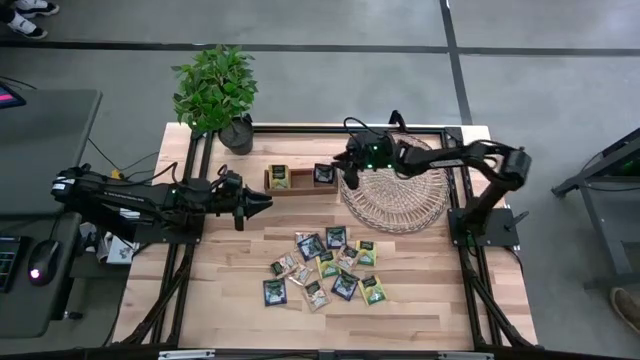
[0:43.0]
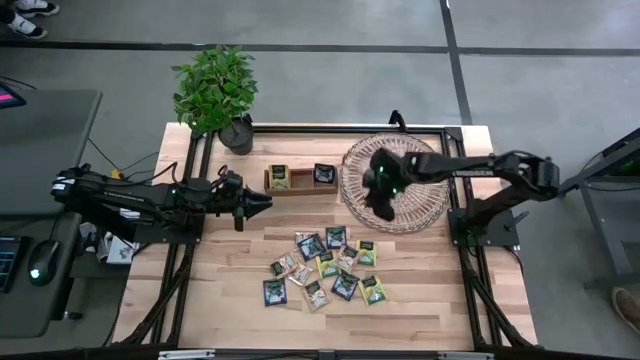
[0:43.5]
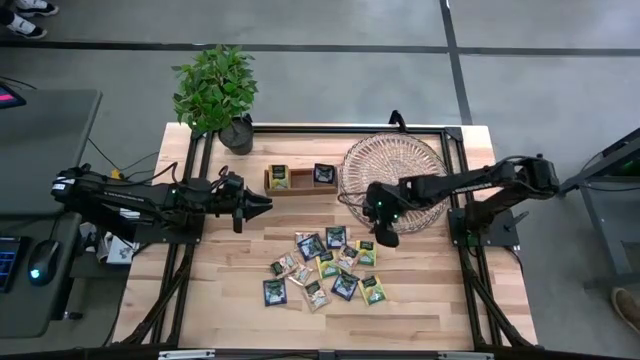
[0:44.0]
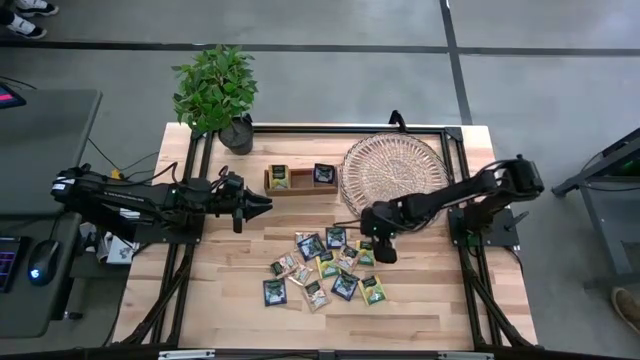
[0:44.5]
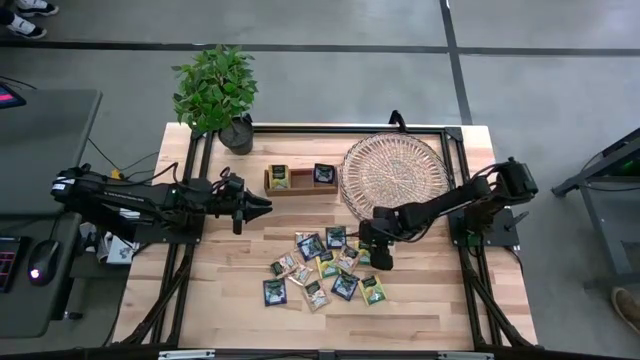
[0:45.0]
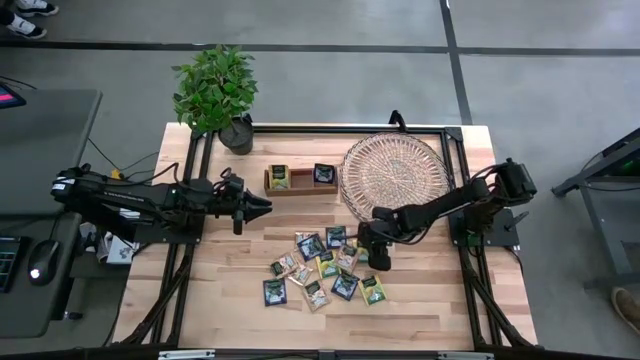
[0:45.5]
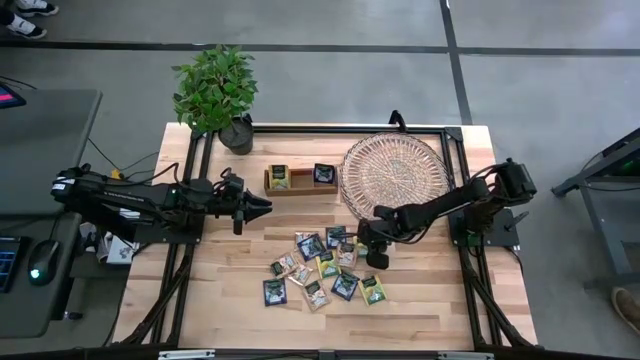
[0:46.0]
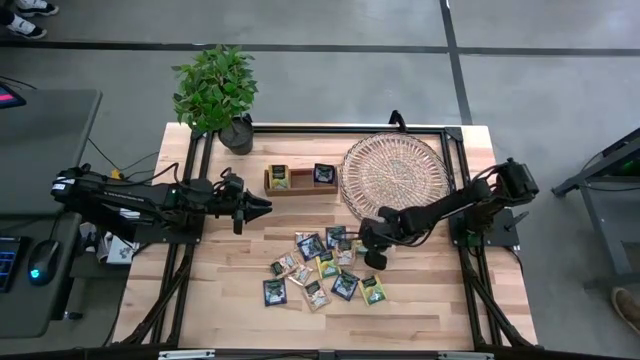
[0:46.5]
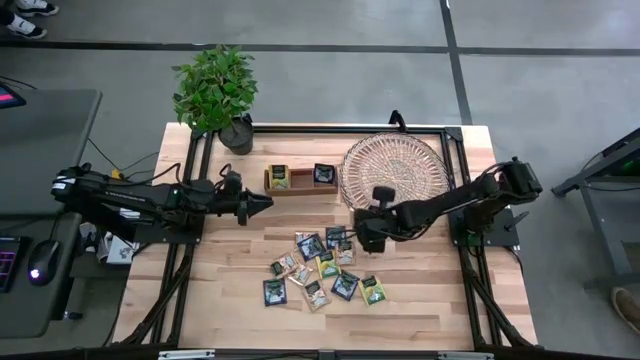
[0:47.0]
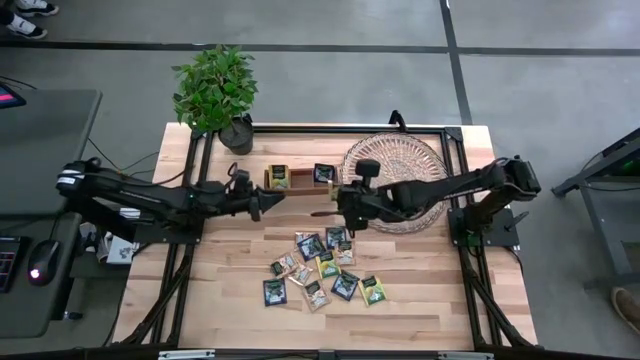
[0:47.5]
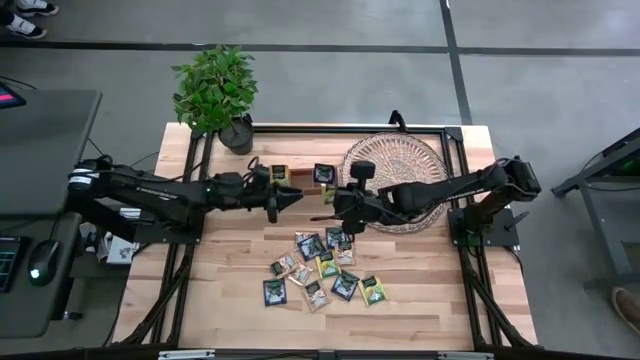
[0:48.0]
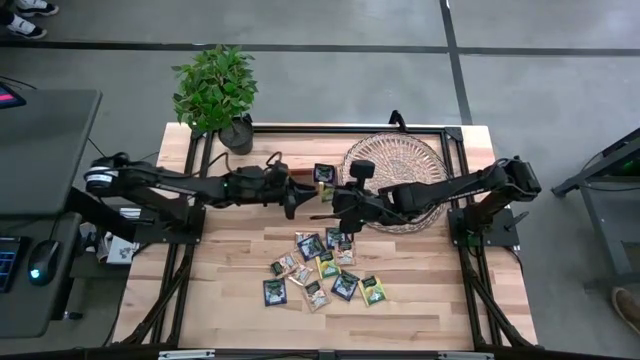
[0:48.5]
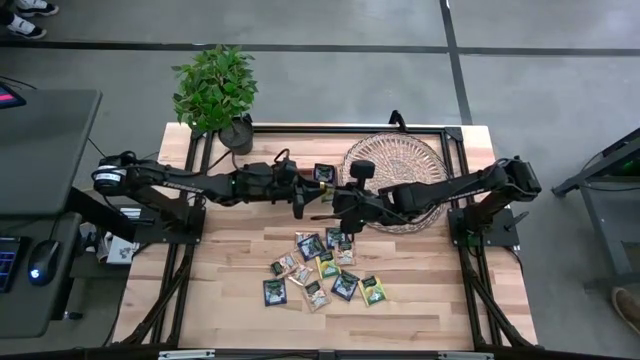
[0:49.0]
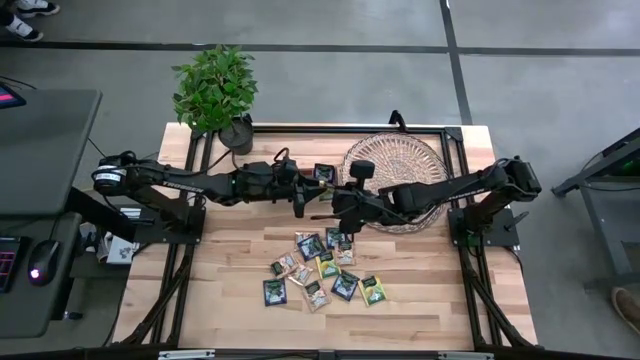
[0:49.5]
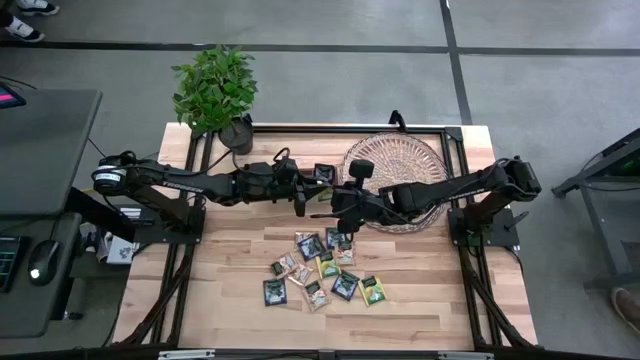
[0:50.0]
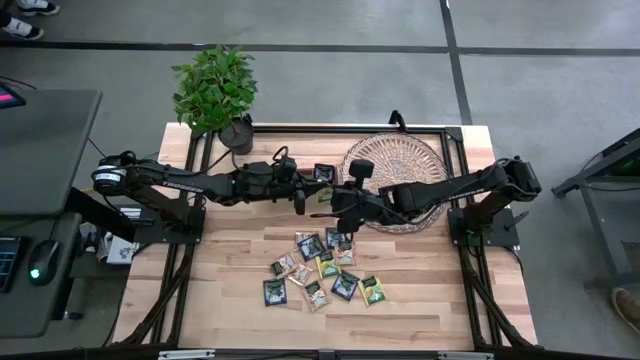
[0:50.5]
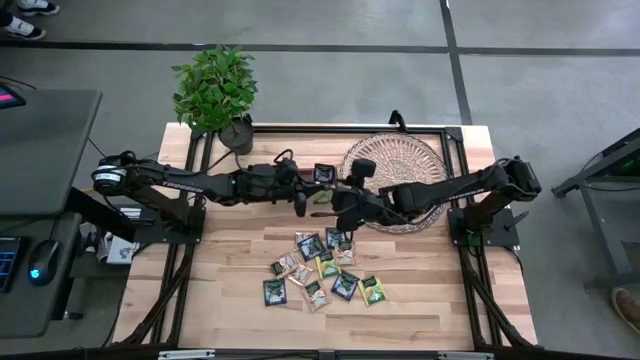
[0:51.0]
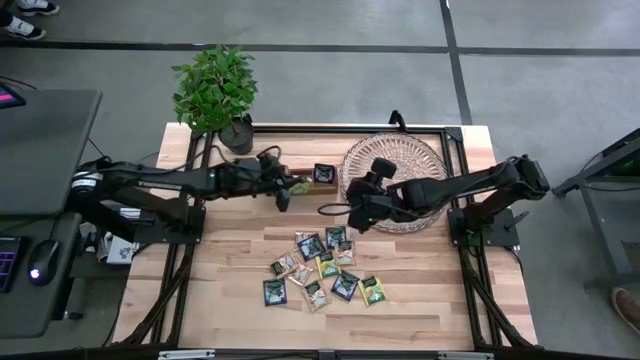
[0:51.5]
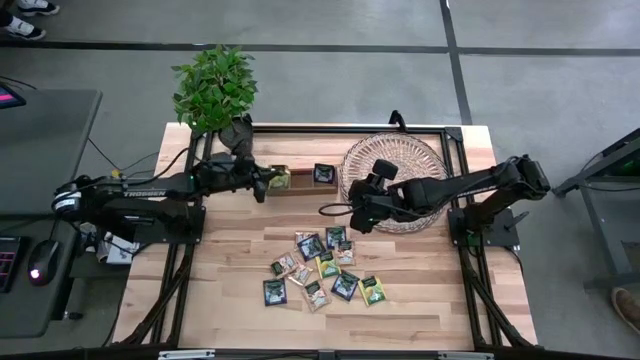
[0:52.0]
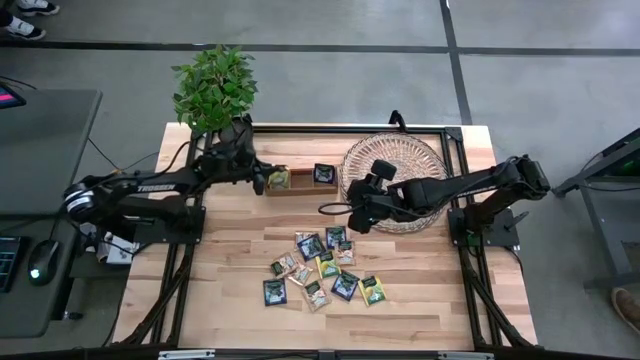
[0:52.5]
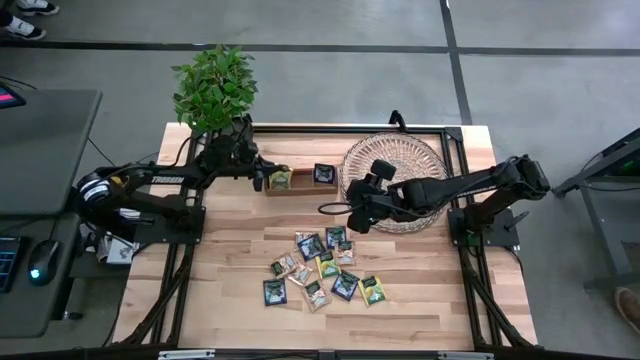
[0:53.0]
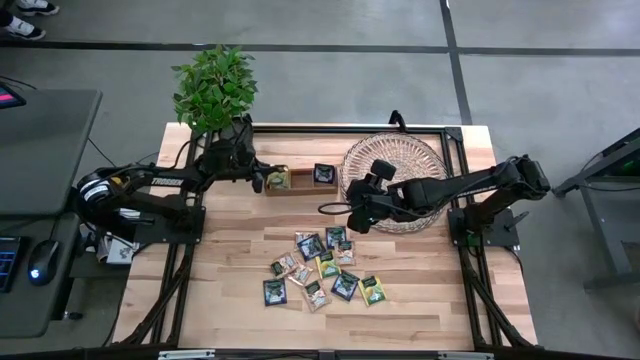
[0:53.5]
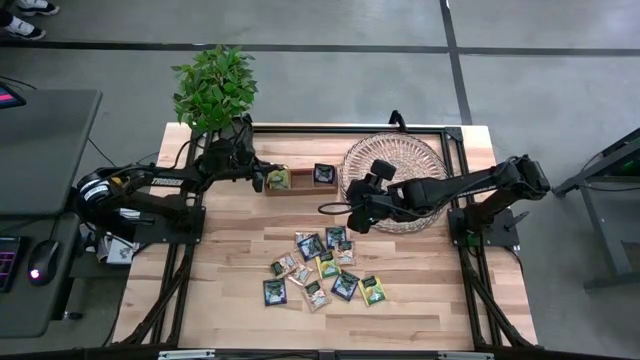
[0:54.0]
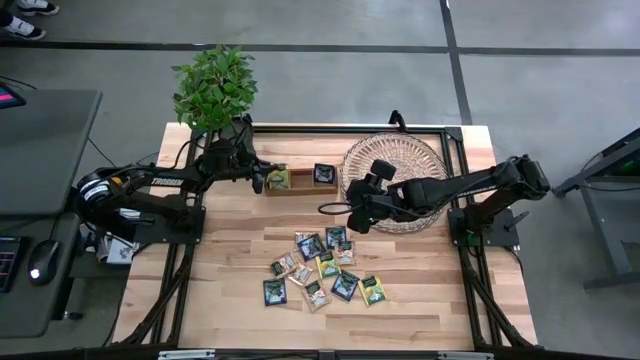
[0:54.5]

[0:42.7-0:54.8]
Task: Pick & Place Tea
Put the yellow tea bag into the left section of the wooden organizer

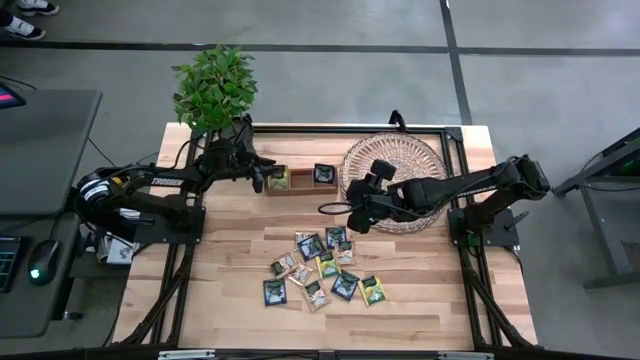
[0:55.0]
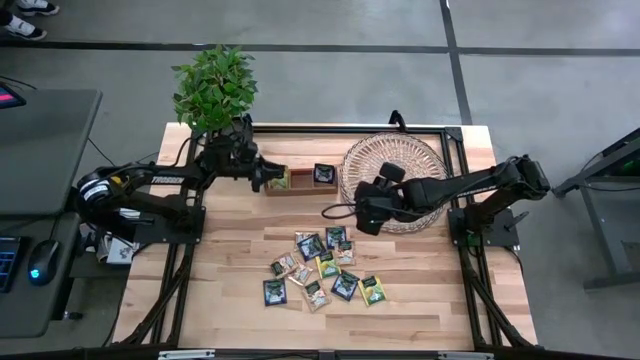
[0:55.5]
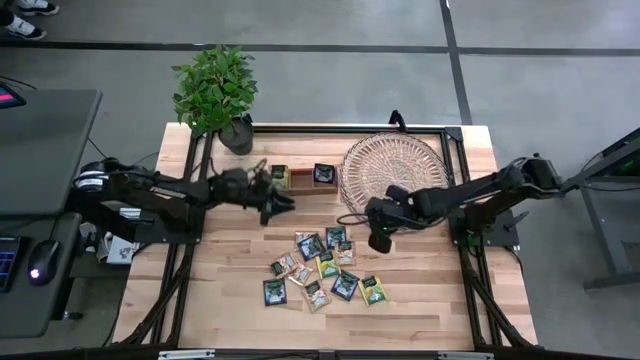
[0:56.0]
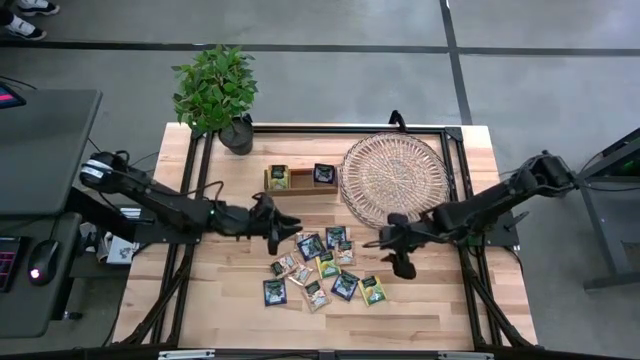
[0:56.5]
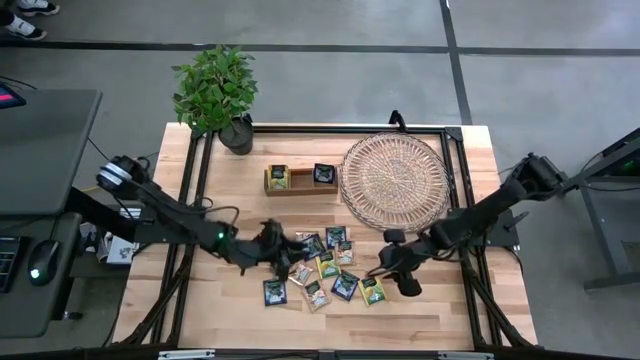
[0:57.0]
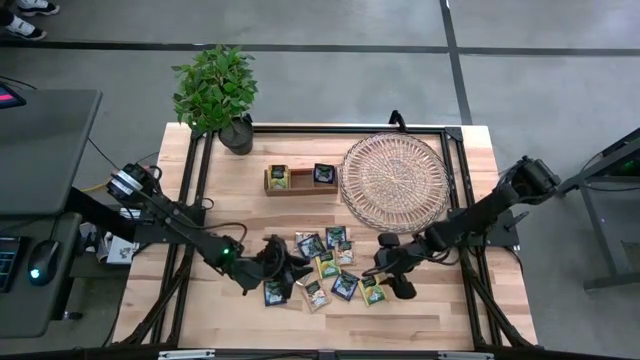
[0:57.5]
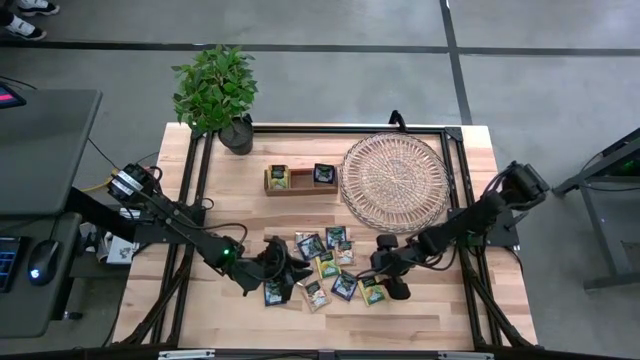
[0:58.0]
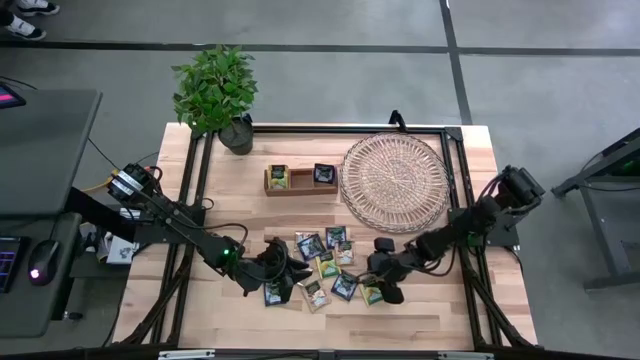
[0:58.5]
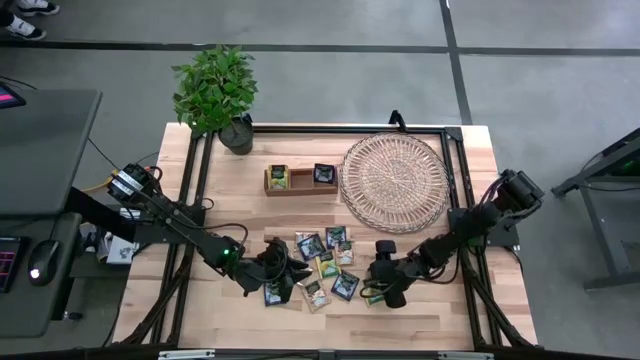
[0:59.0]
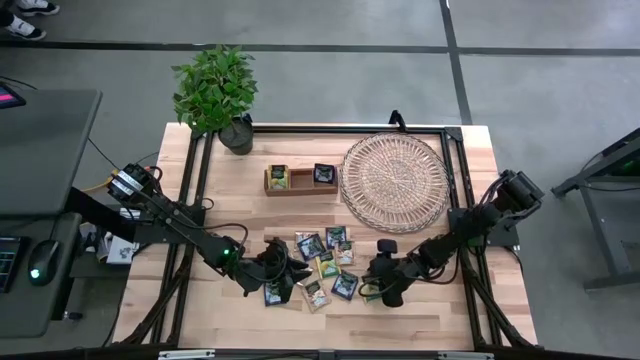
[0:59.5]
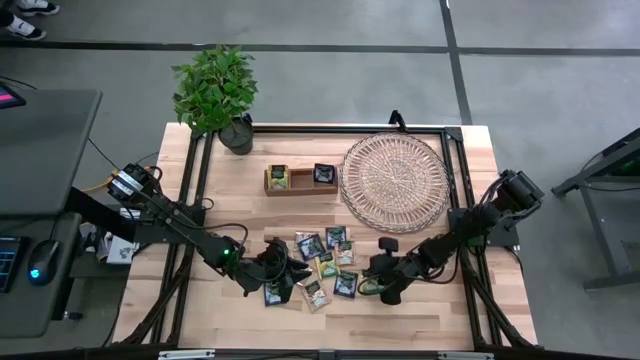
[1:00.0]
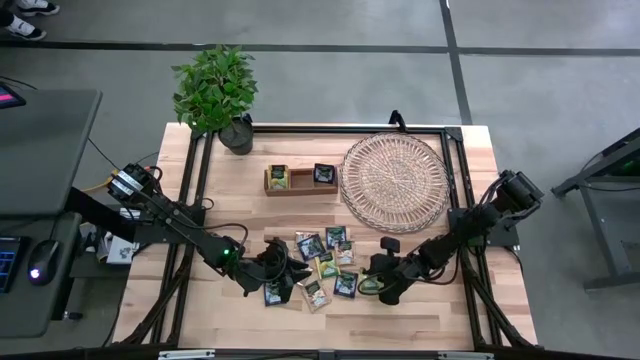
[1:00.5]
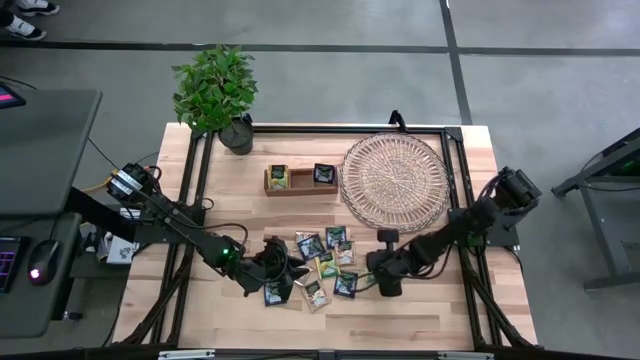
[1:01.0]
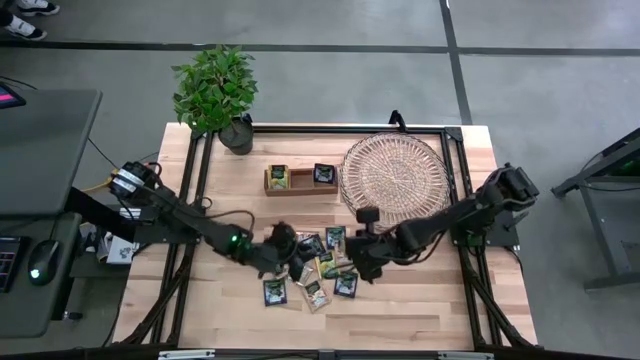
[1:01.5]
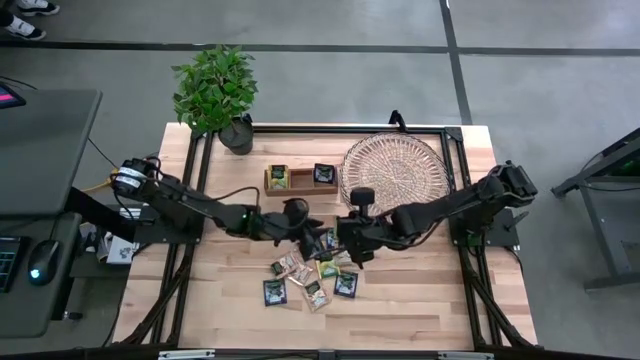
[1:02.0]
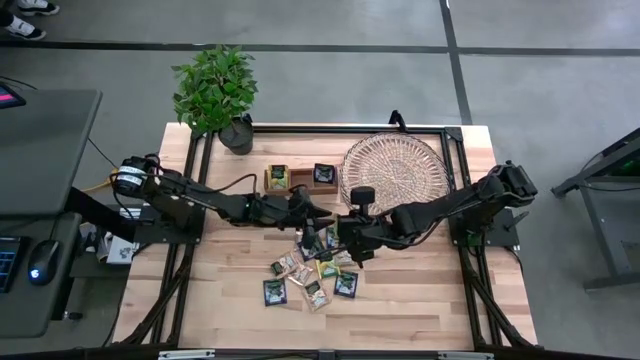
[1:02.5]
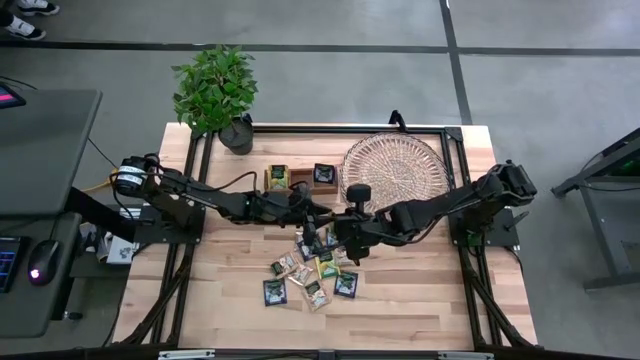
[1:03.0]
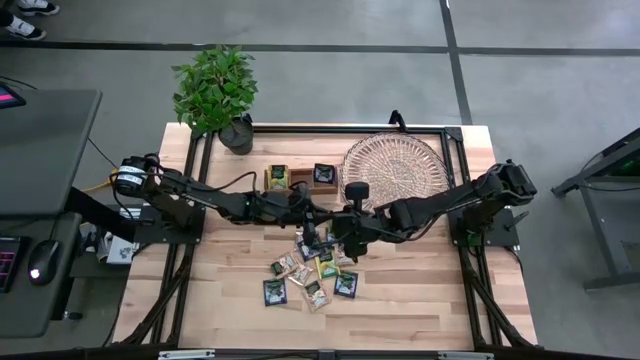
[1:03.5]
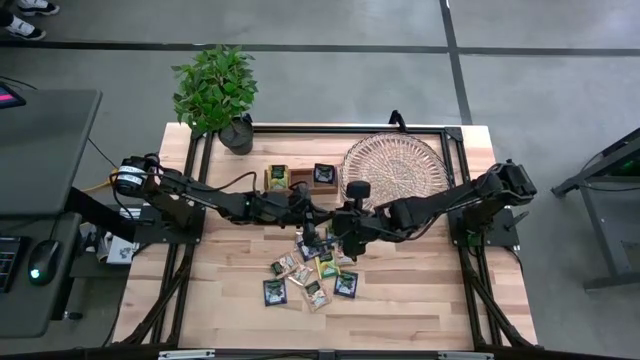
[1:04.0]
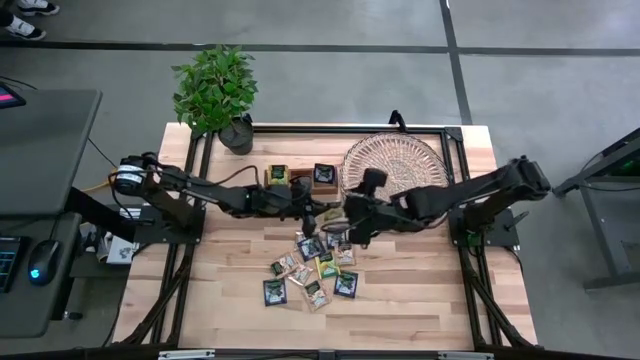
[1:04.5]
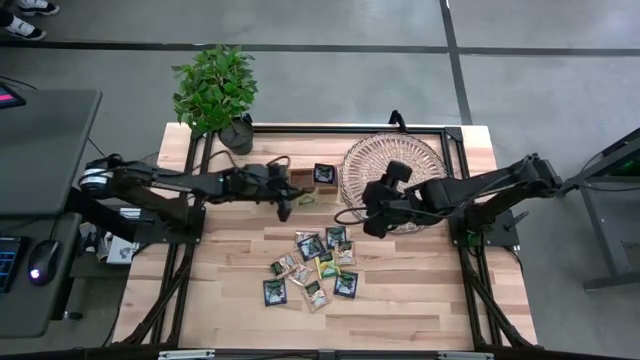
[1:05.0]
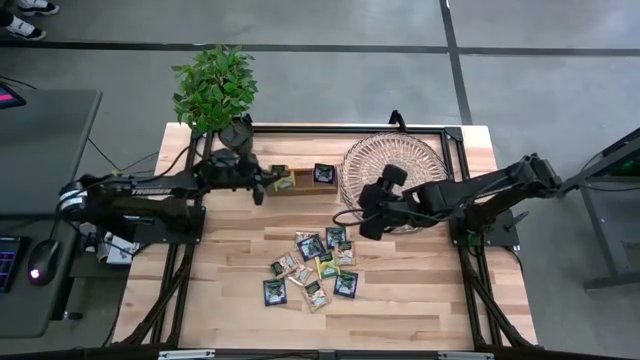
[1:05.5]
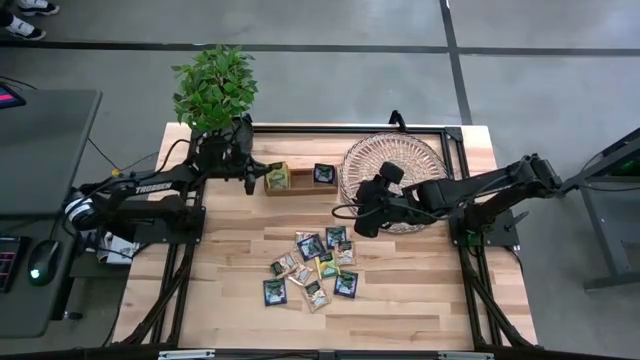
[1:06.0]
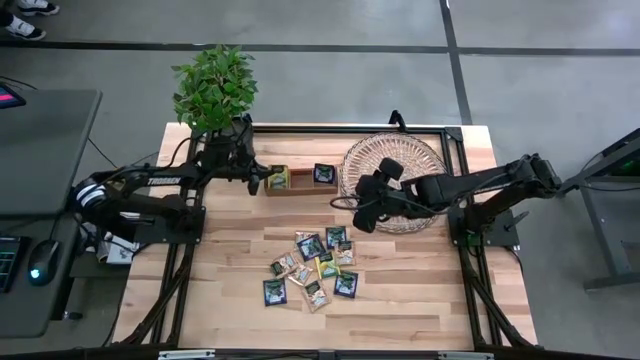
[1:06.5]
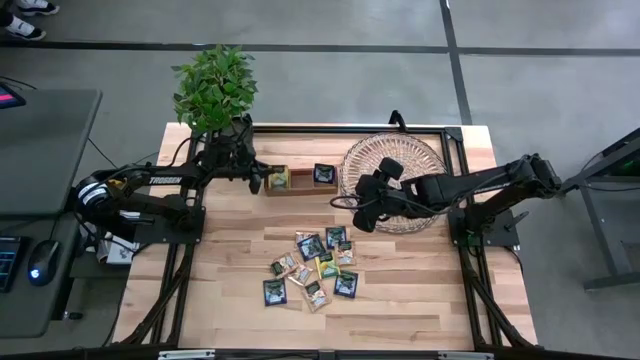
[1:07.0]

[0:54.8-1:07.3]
Put the yellow tea bag into the left section of the wooden organizer
